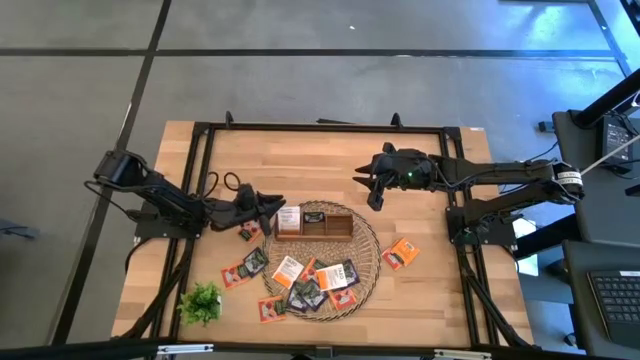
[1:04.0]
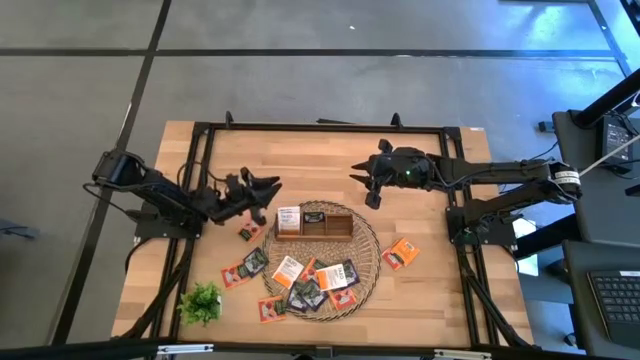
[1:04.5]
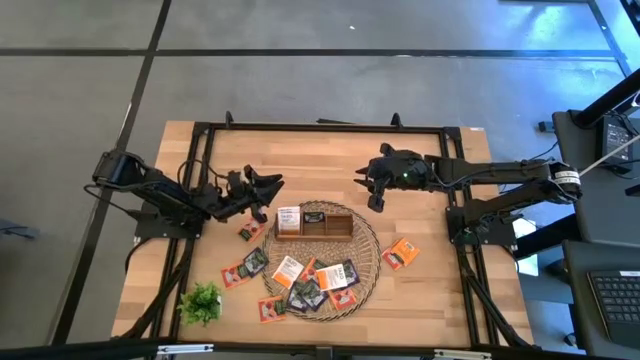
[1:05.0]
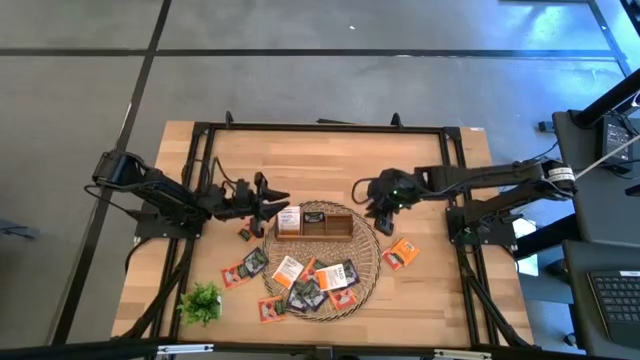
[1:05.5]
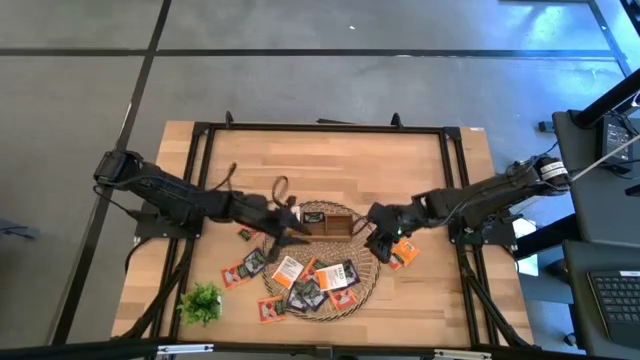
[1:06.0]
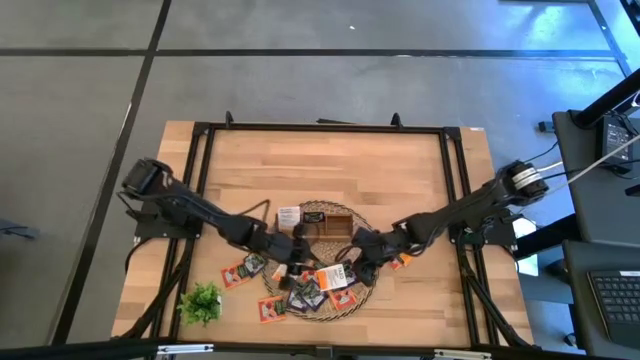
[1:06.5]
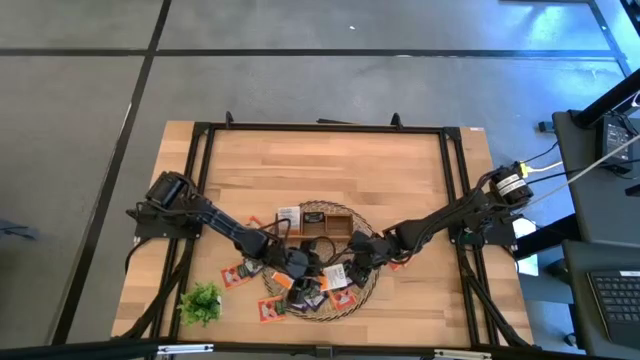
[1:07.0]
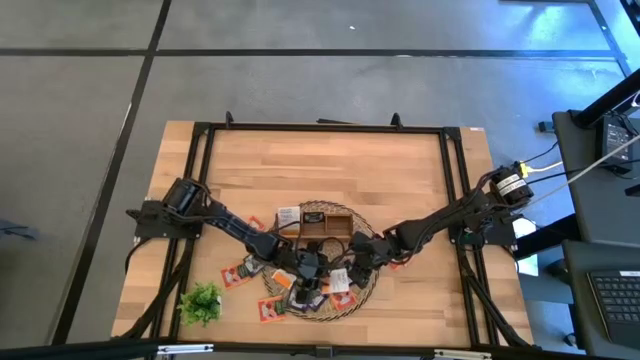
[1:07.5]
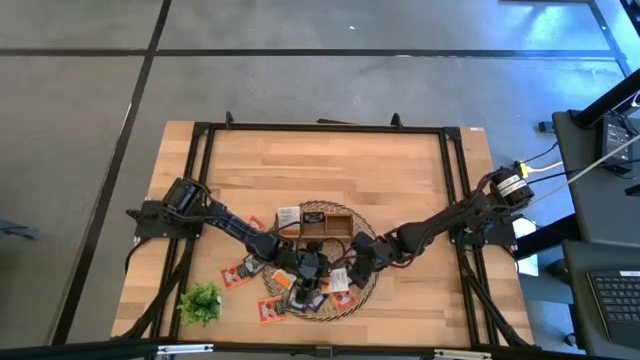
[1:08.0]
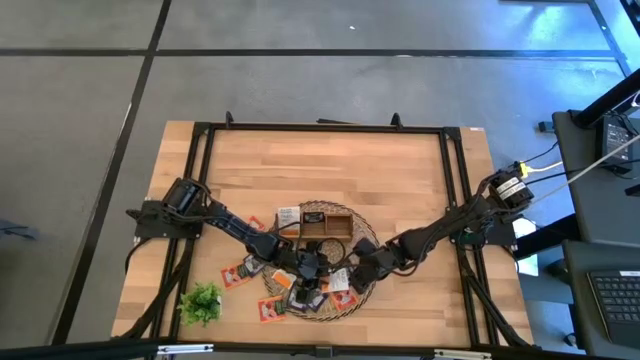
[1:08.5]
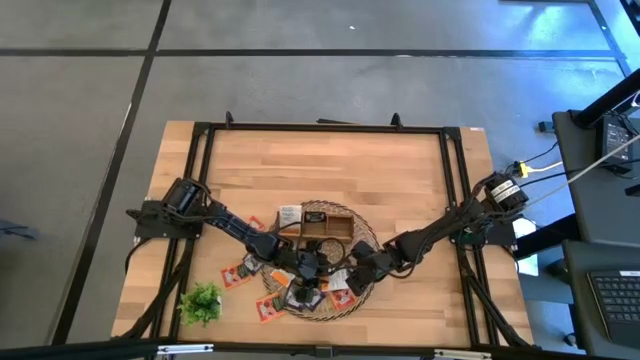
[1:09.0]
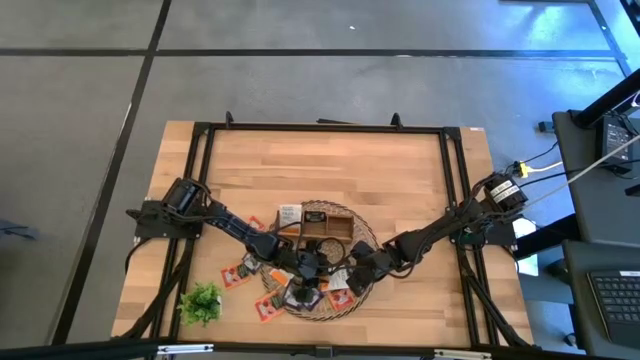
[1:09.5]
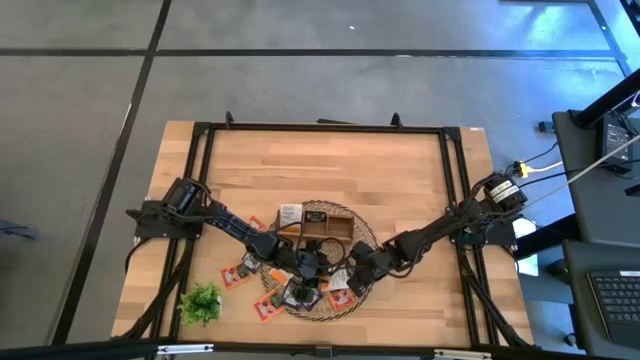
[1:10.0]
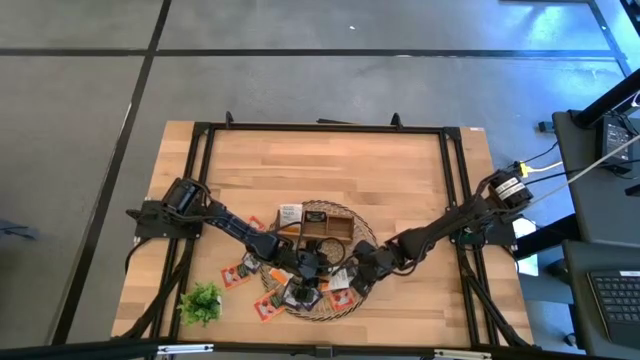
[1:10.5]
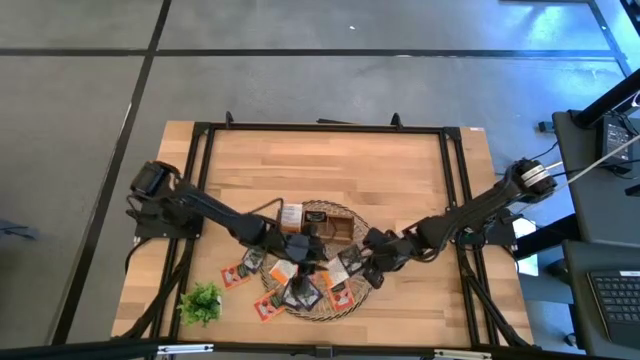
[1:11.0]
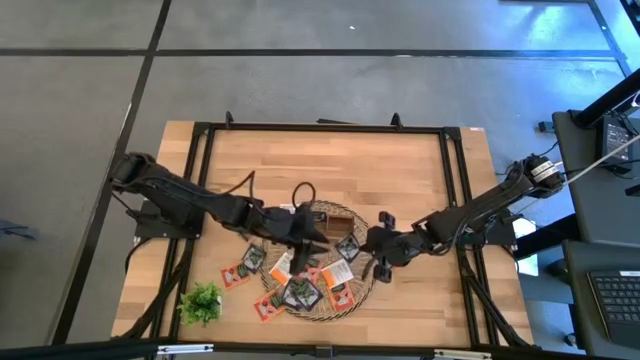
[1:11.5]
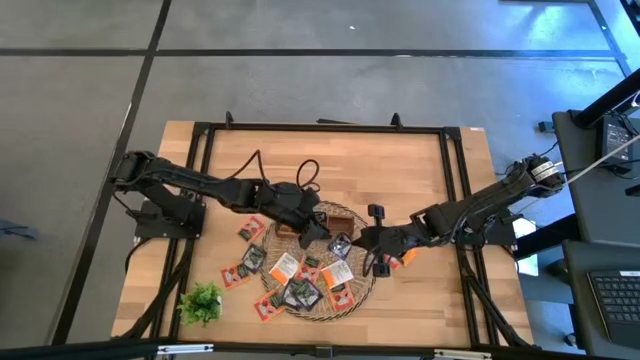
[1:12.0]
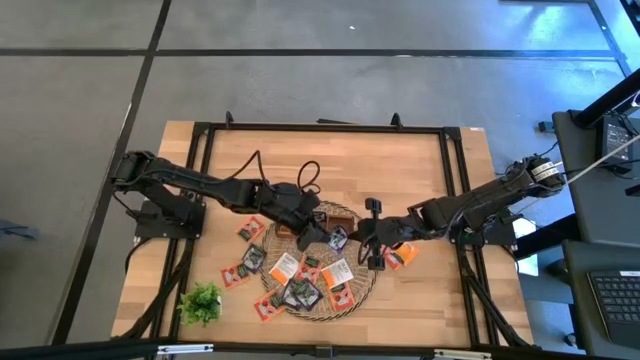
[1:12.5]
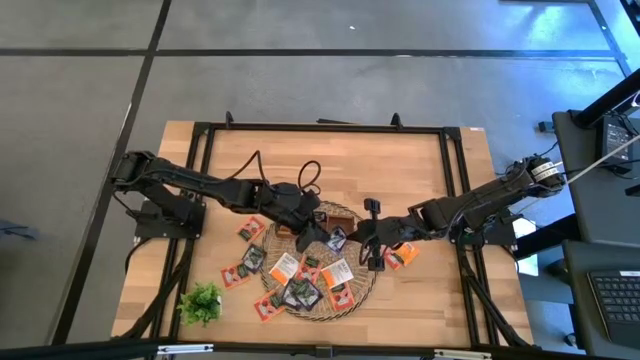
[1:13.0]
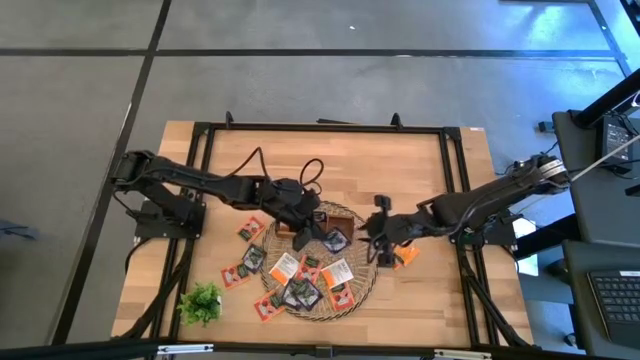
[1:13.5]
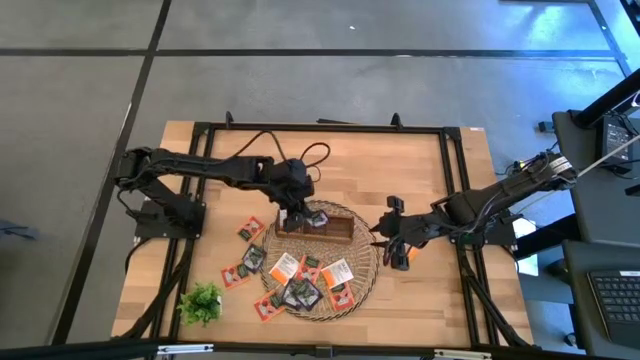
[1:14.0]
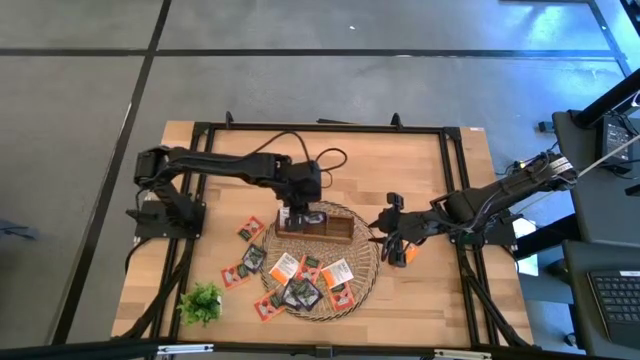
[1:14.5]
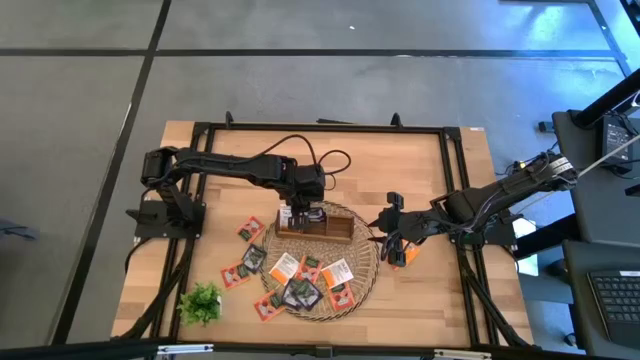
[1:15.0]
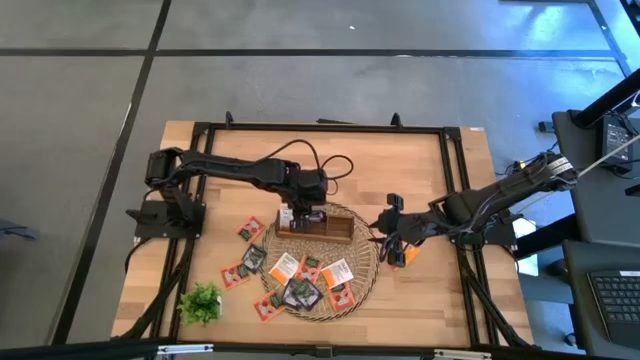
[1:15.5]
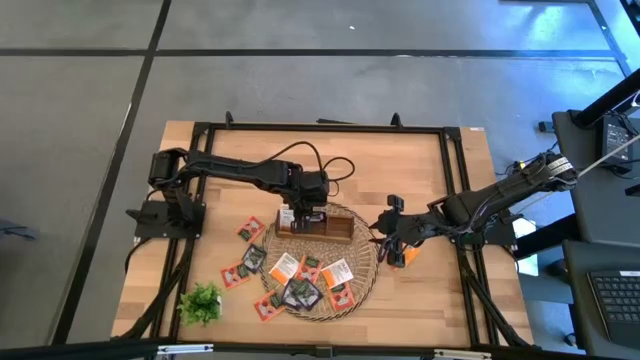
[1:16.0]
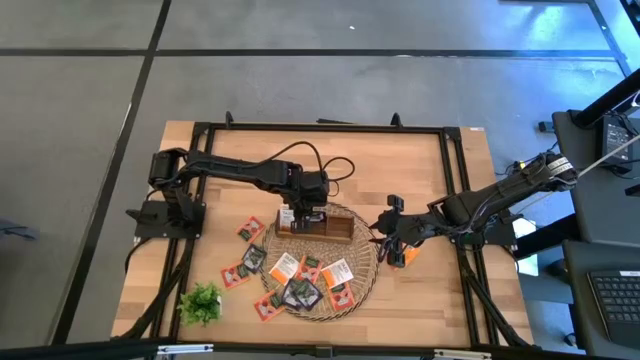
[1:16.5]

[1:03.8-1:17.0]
Task: Pick & Place Tea
Put the violet tea bag into the middle slot of the wooden organizer

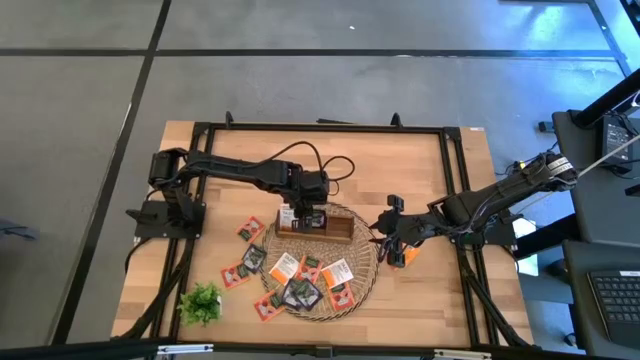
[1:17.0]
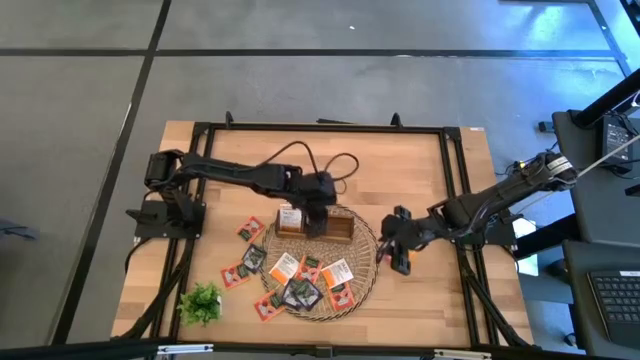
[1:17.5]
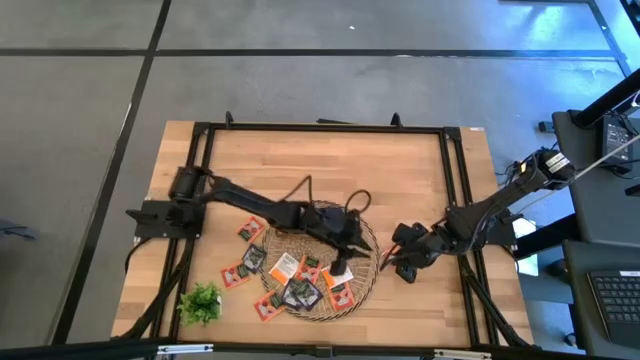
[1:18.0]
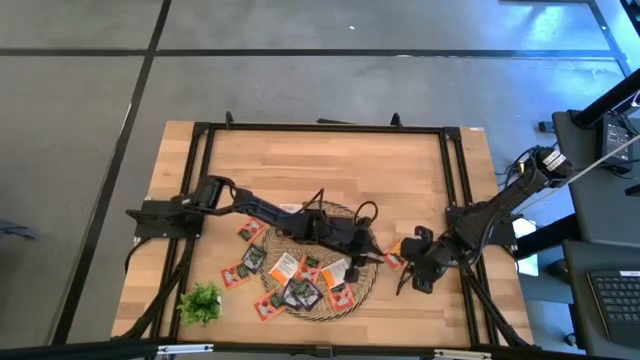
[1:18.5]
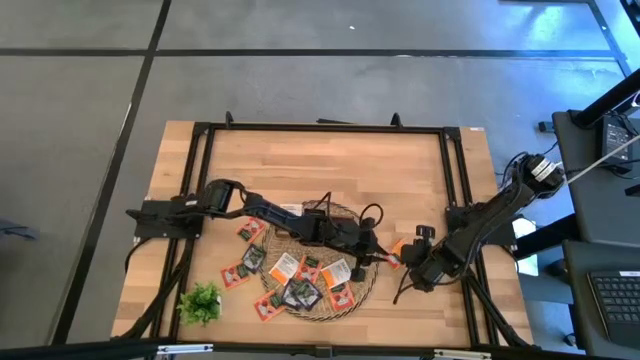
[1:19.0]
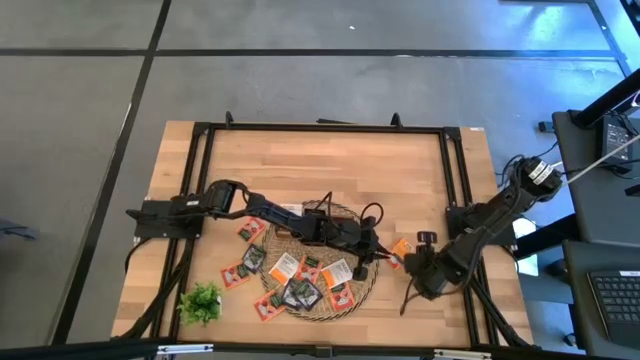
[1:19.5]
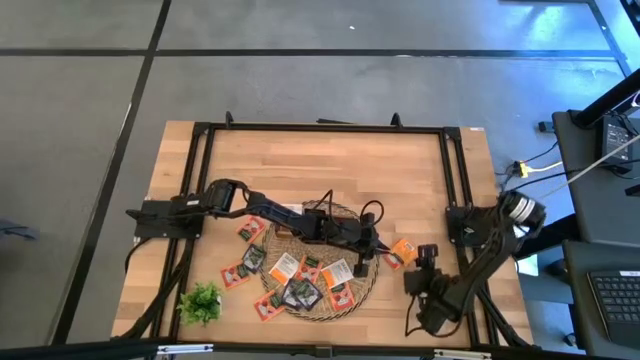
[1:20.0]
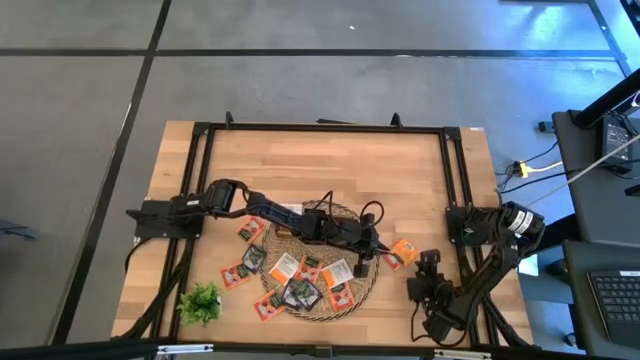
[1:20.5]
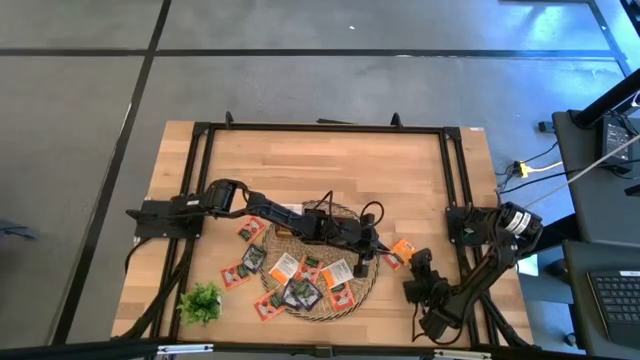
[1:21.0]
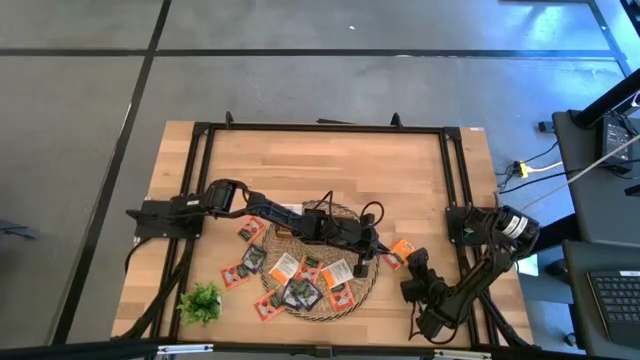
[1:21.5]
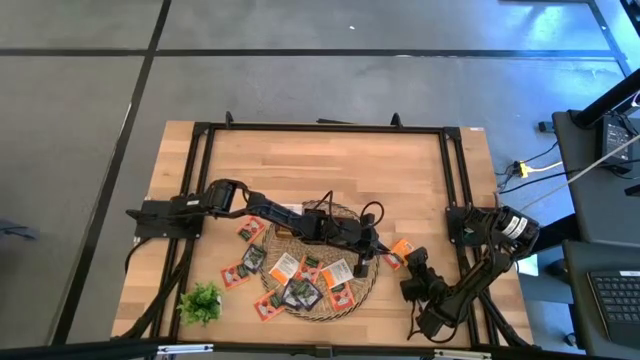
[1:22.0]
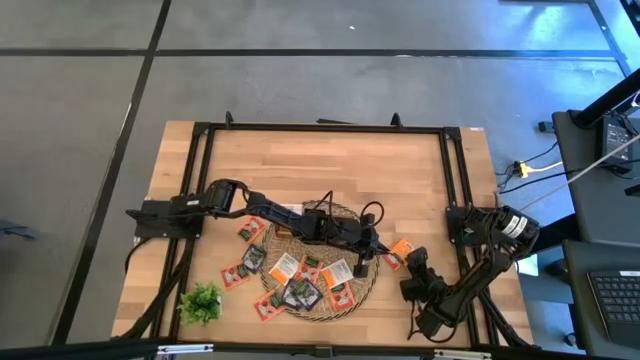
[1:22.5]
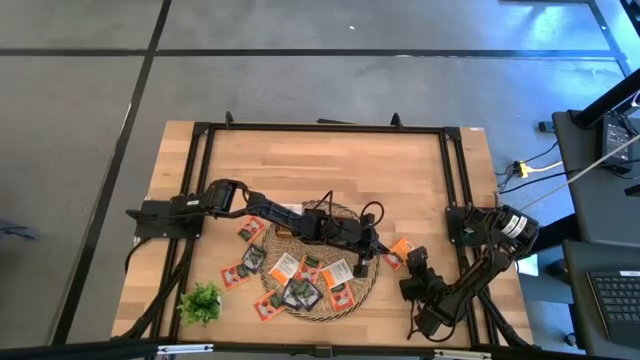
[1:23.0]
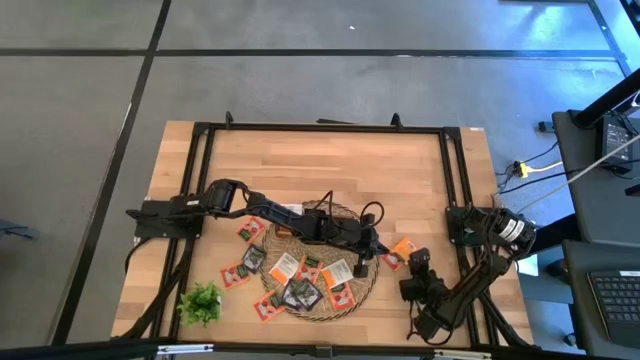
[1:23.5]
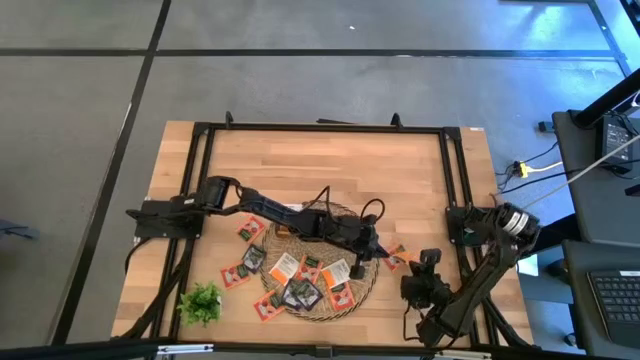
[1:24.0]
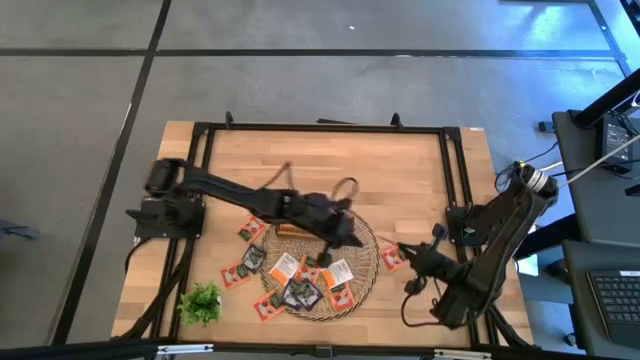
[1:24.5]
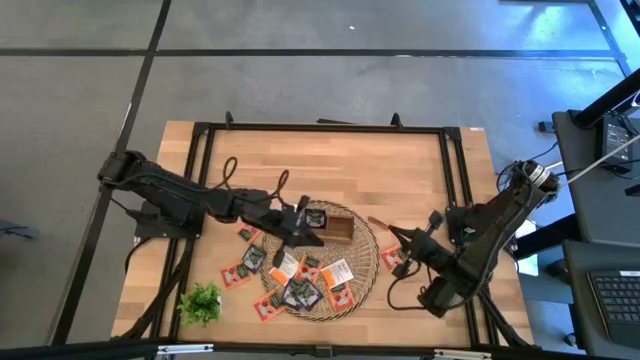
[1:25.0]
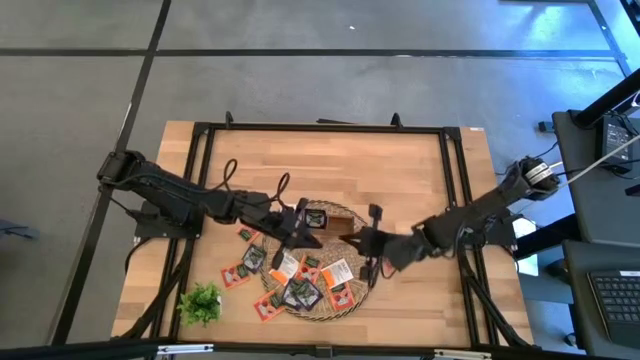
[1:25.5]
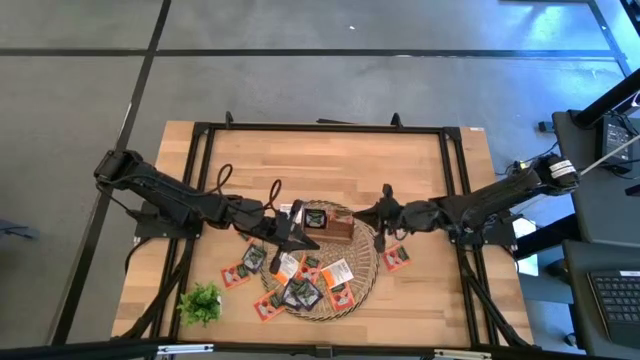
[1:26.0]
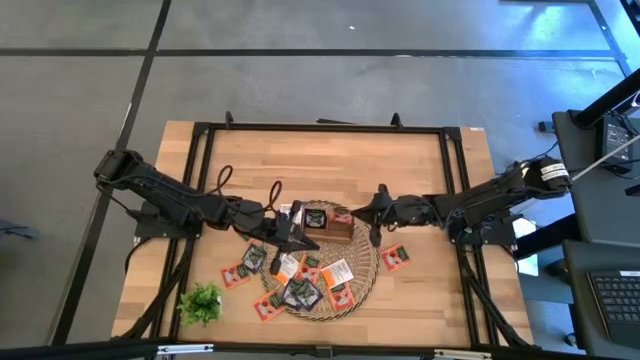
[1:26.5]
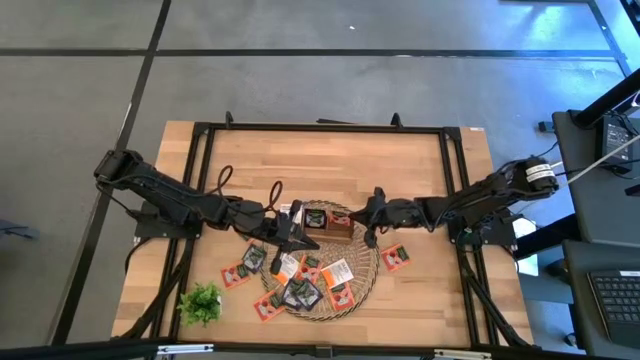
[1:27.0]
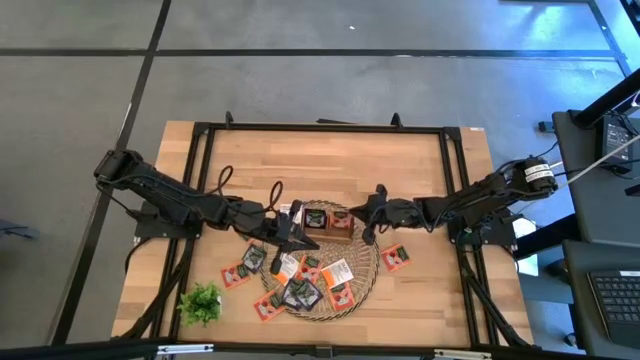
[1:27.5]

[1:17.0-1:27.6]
Put the orange tea bag into the right slot of the wooden organizer
